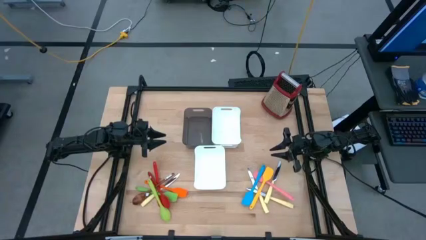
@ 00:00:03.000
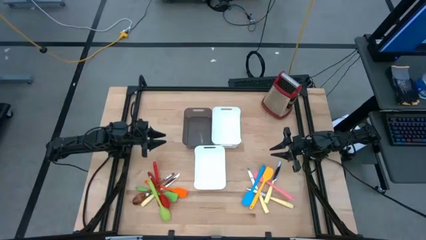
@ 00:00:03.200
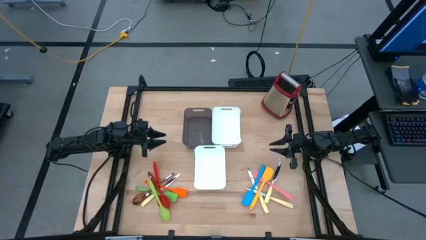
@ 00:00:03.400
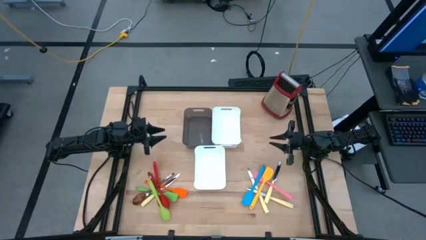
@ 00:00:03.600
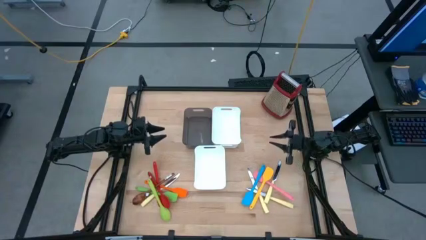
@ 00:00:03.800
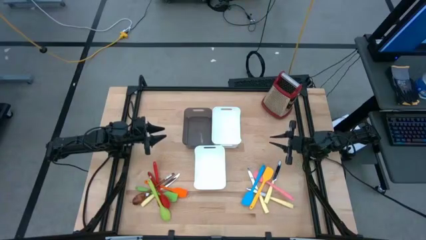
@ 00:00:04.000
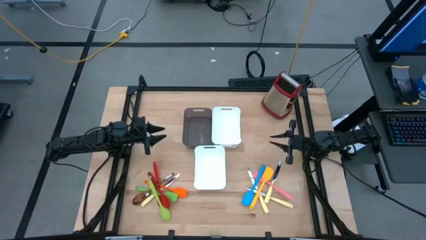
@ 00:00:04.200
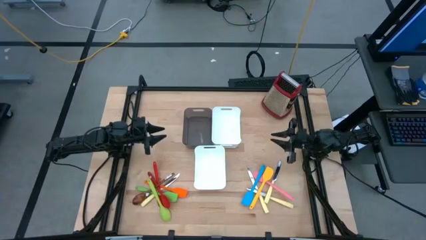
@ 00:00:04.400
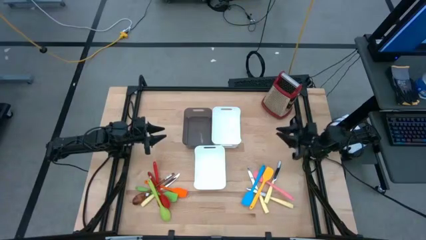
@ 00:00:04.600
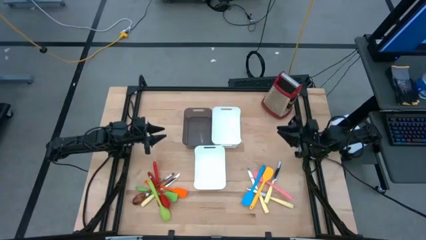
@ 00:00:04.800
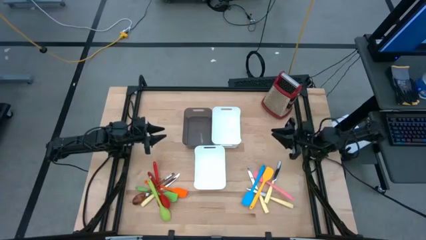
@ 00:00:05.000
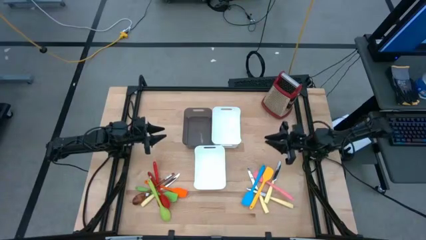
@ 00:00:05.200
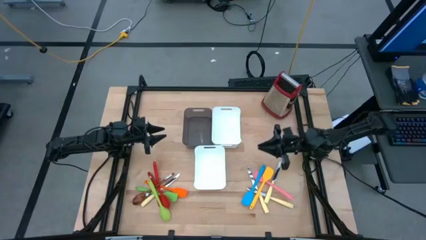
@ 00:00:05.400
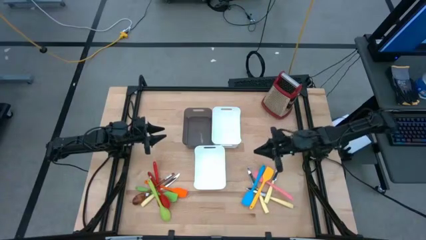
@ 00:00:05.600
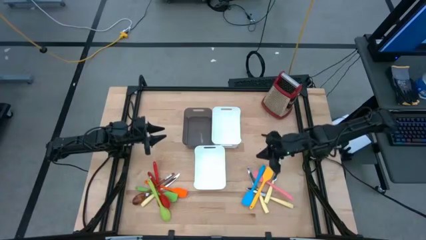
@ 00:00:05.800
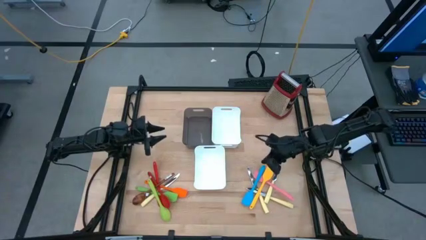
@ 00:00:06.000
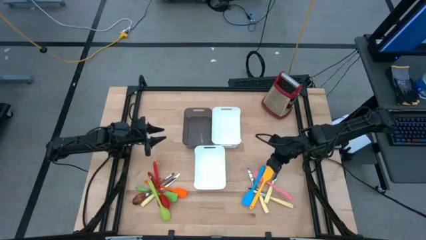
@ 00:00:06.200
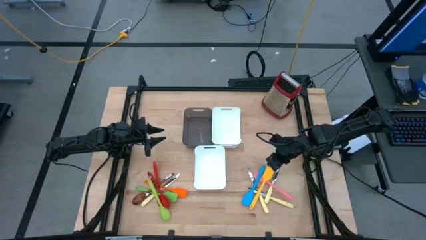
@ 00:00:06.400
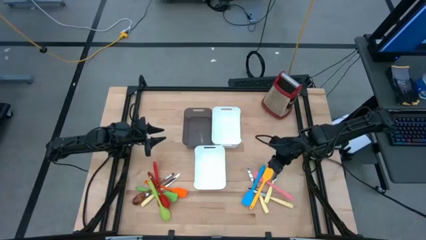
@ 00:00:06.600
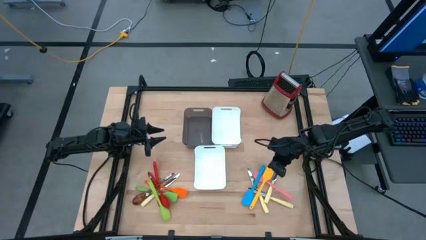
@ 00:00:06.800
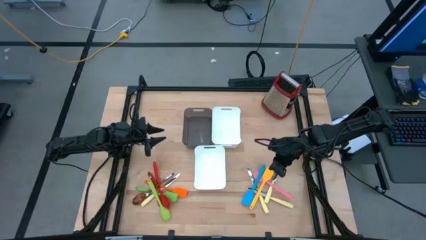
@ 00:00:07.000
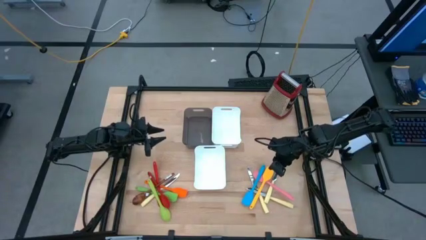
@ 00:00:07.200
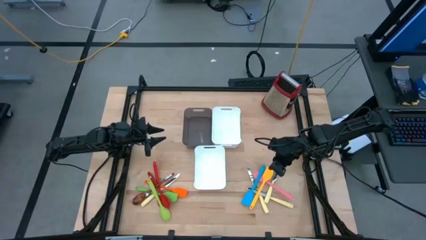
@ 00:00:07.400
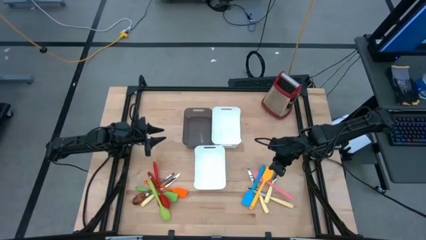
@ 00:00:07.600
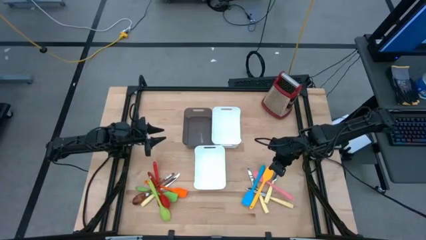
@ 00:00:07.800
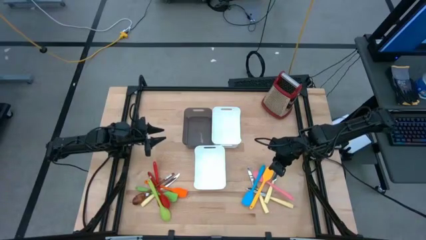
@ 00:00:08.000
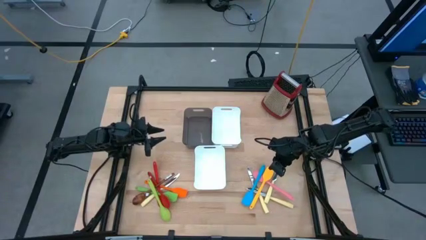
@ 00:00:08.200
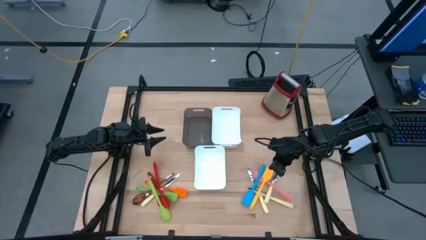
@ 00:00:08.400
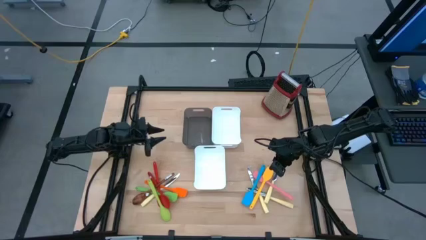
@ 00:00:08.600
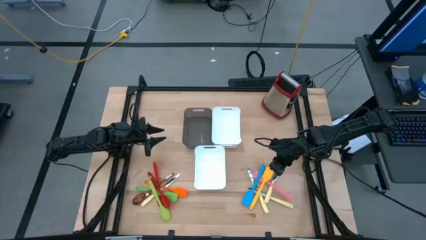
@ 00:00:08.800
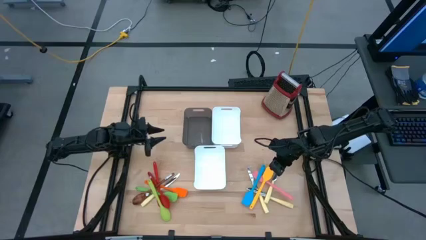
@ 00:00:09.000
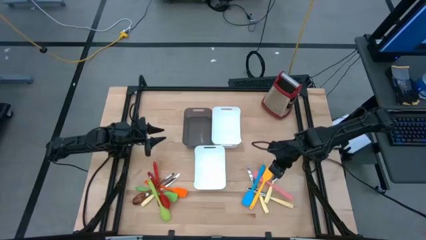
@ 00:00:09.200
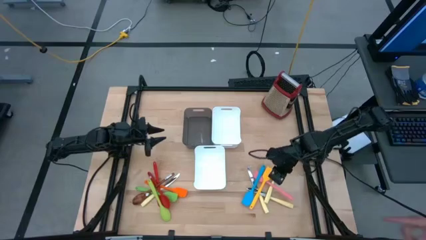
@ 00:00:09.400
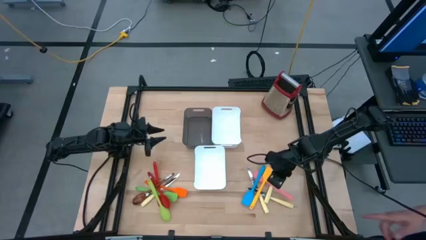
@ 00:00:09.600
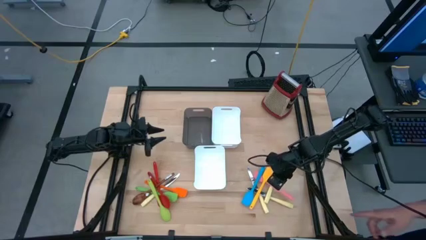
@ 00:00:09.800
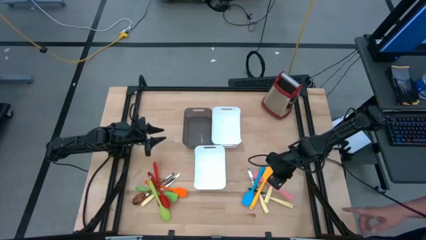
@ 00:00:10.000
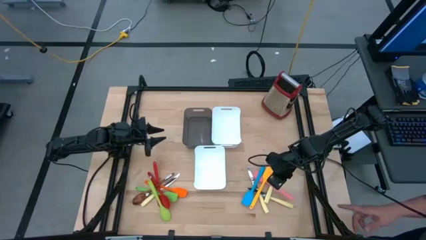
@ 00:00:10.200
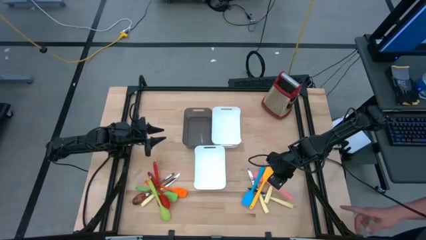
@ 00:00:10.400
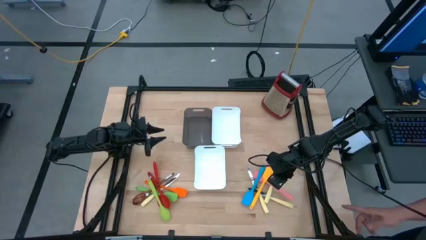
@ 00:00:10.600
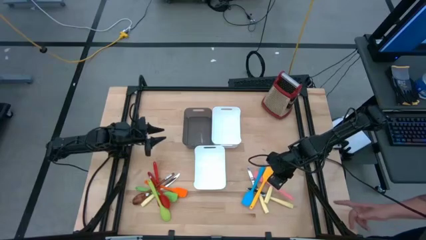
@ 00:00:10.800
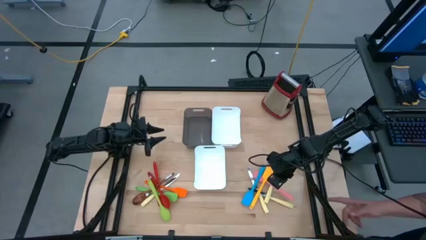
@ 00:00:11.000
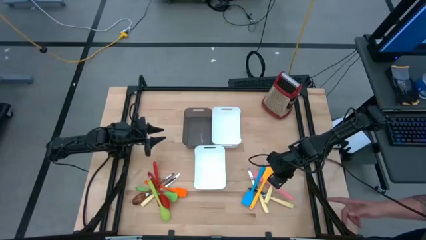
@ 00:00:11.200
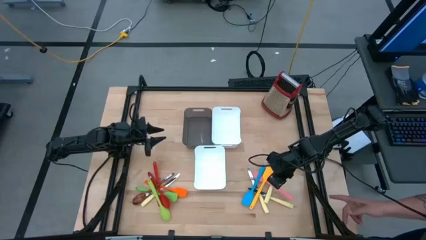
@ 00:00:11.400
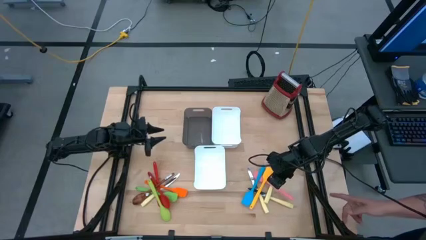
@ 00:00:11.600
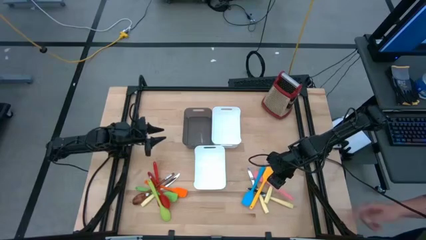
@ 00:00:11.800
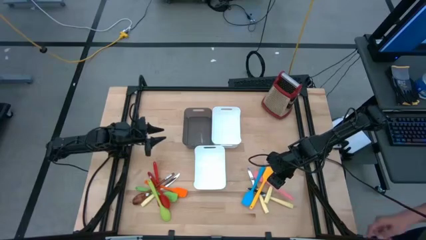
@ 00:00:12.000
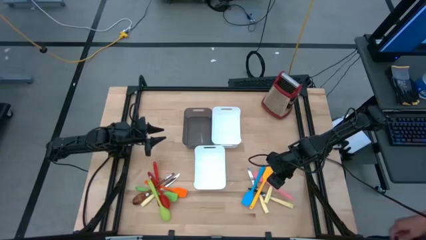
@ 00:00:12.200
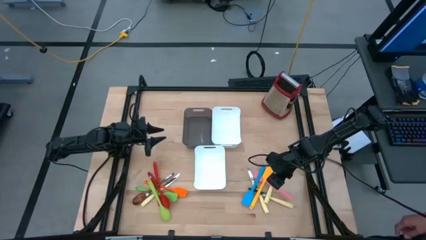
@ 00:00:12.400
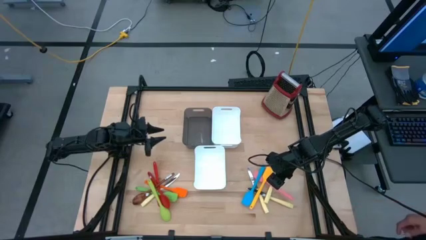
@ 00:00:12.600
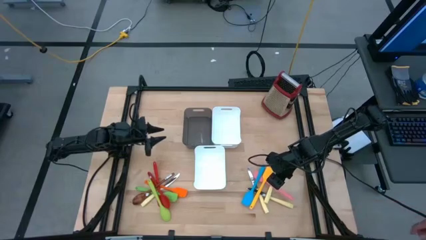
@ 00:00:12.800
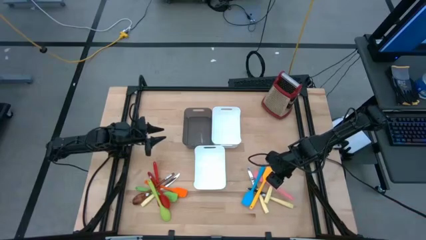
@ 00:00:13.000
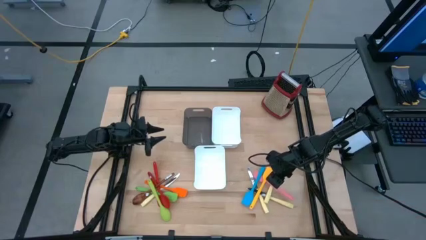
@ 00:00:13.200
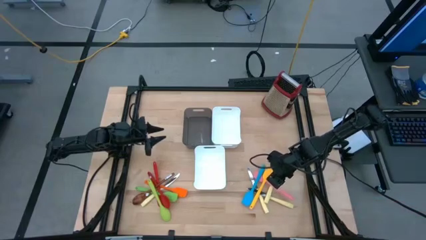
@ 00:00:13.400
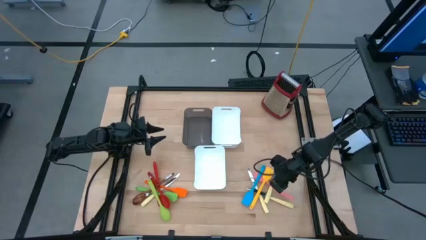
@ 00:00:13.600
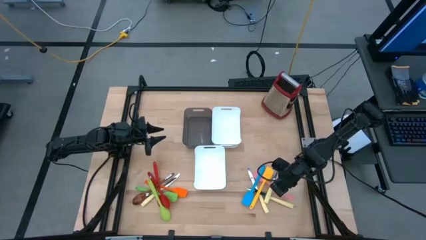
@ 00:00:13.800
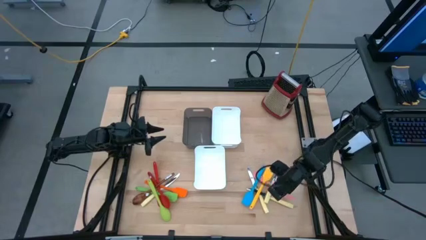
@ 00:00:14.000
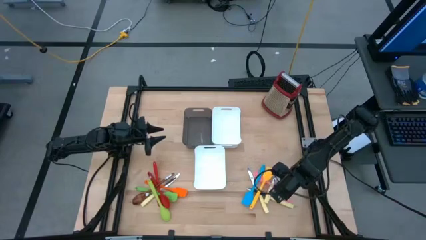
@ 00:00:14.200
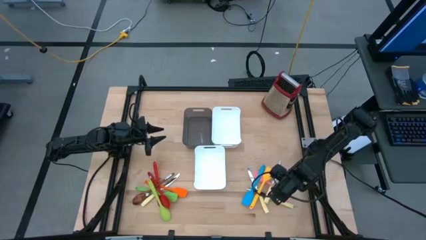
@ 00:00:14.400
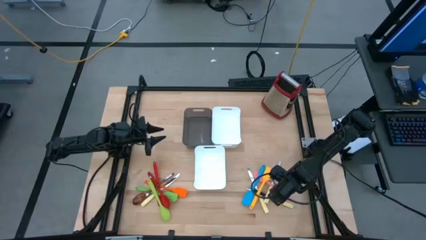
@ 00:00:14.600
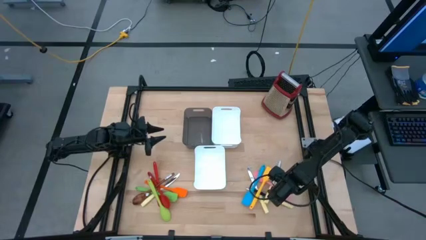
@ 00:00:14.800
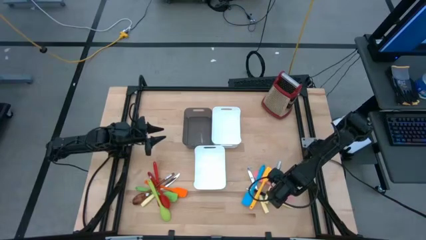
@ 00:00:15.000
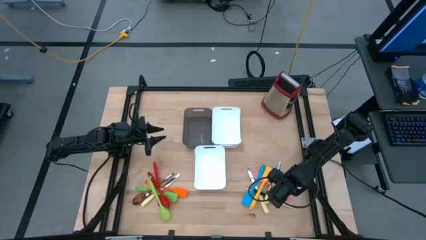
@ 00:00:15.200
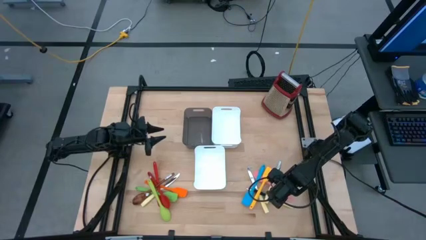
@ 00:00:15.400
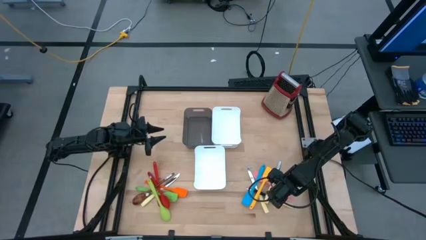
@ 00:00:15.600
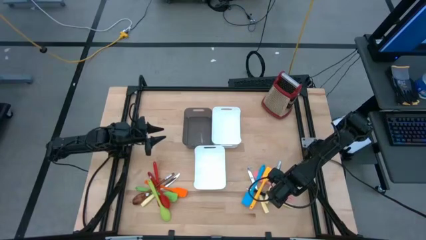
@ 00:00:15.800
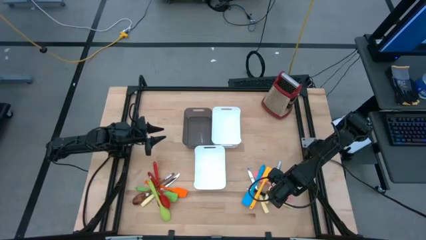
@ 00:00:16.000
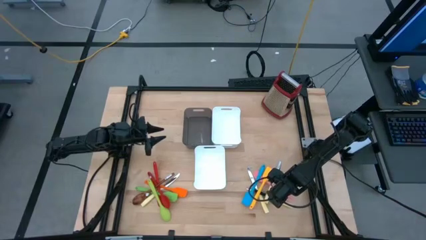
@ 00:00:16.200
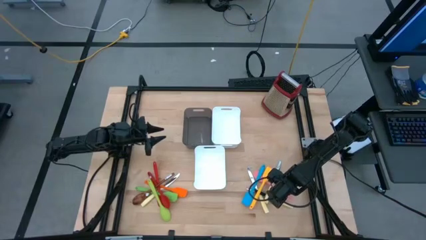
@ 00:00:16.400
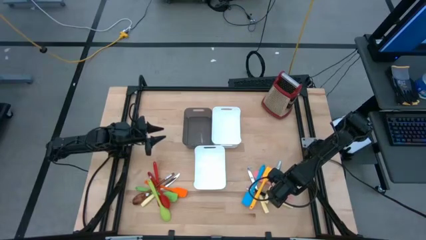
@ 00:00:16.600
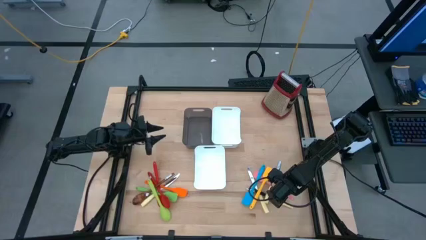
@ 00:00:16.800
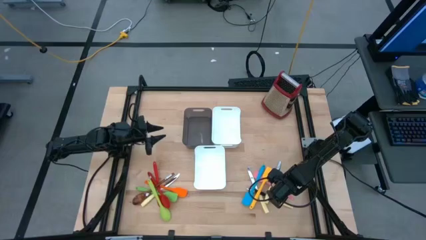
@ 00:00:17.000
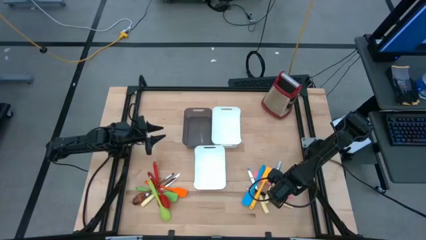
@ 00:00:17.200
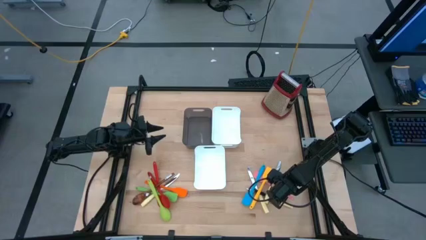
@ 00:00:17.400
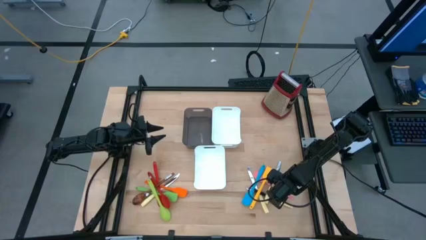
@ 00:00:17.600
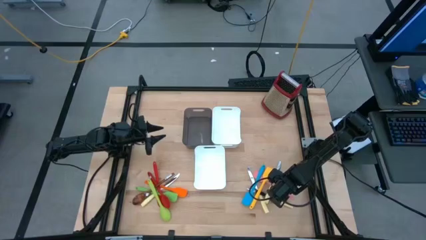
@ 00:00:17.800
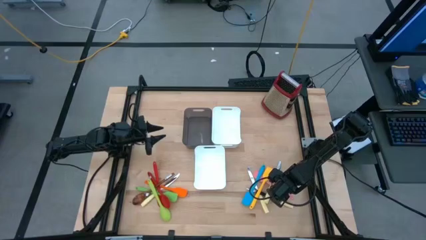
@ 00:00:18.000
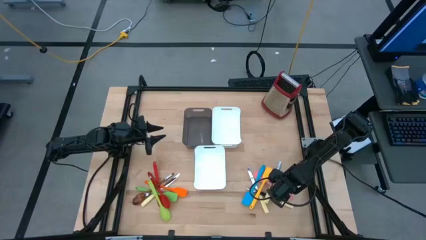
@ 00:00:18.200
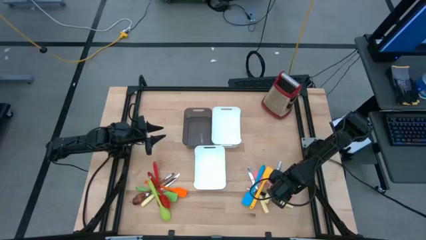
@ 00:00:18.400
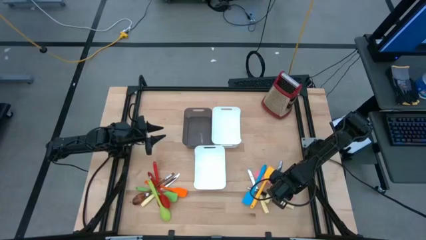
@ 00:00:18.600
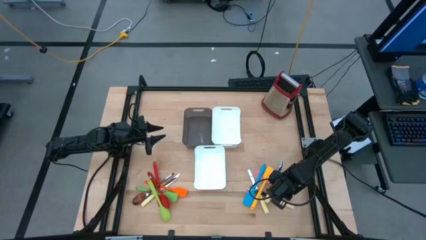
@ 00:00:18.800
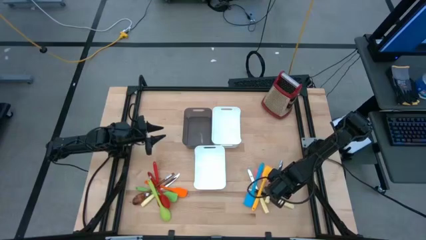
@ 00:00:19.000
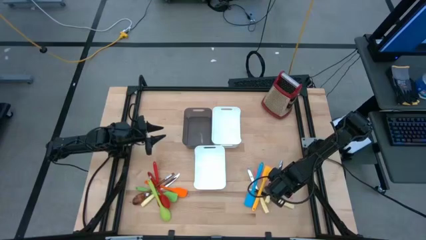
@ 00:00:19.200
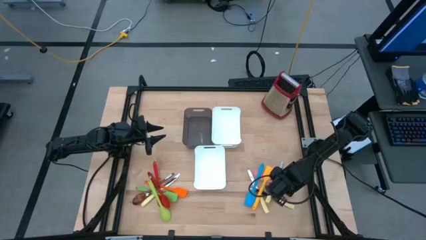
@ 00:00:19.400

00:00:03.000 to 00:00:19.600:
Task: Pick & Place Kitchen Items
Put the pink spatula into the top white bin
